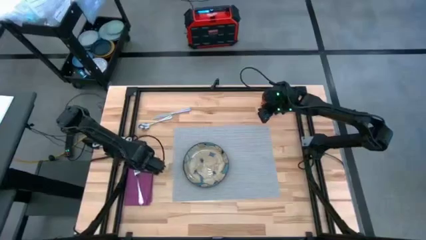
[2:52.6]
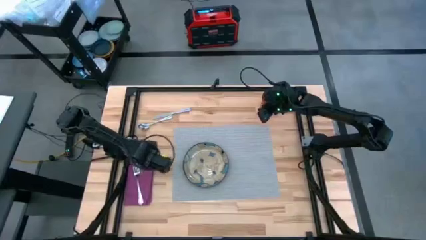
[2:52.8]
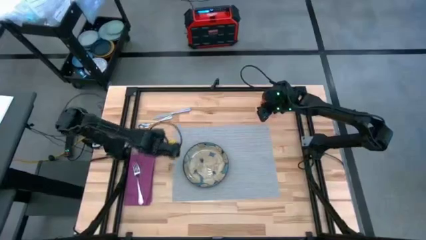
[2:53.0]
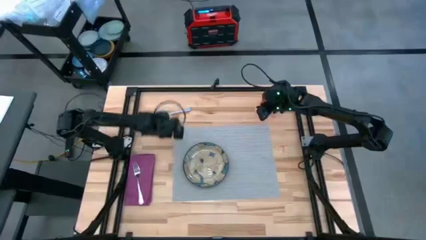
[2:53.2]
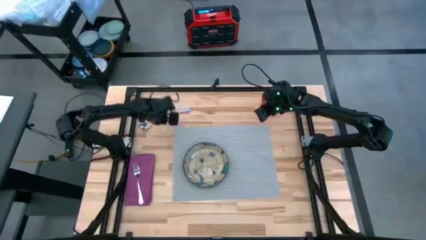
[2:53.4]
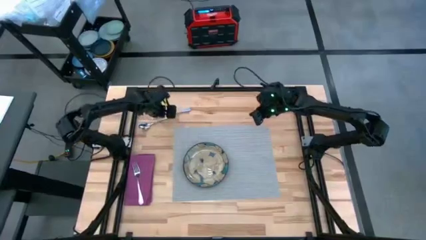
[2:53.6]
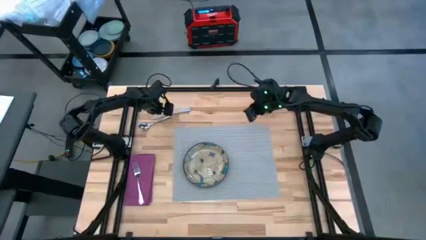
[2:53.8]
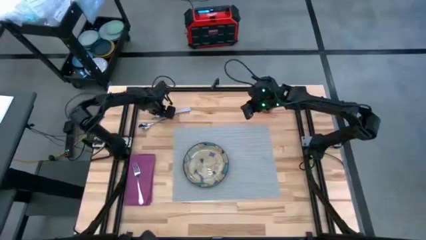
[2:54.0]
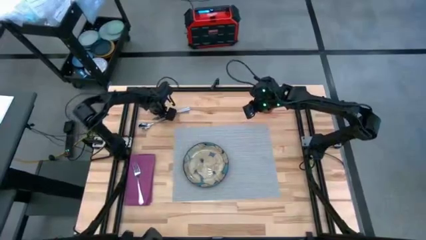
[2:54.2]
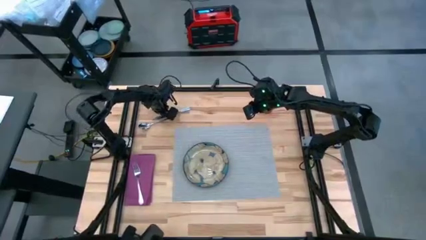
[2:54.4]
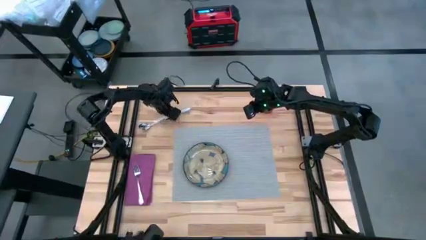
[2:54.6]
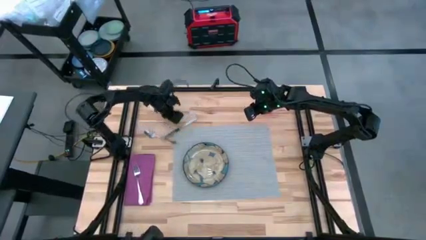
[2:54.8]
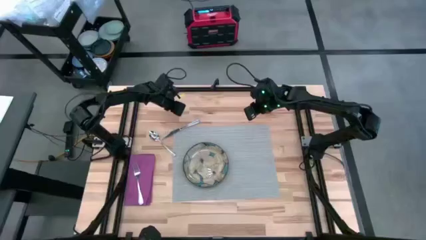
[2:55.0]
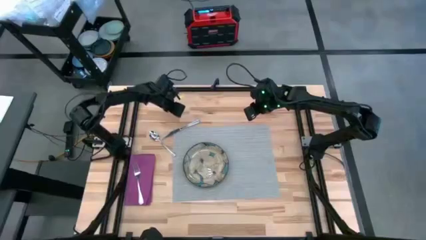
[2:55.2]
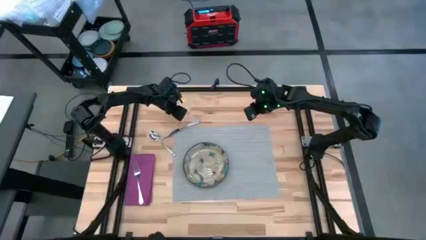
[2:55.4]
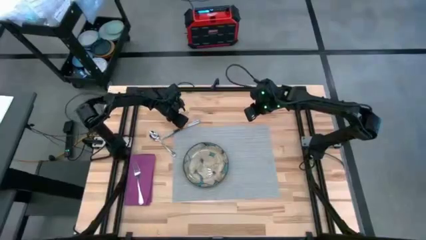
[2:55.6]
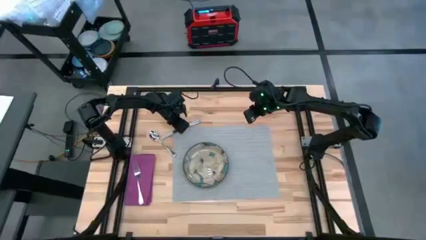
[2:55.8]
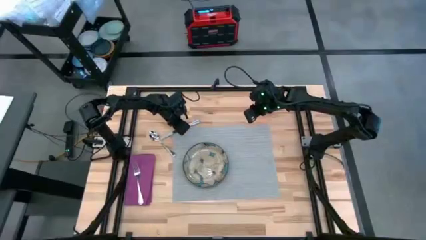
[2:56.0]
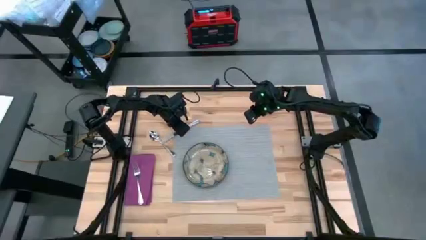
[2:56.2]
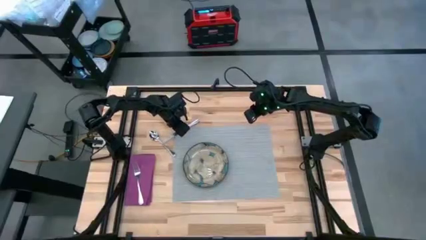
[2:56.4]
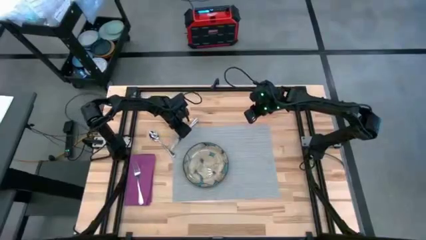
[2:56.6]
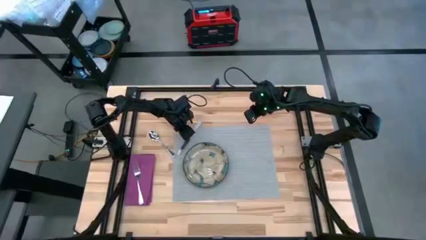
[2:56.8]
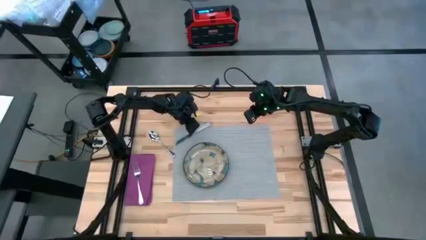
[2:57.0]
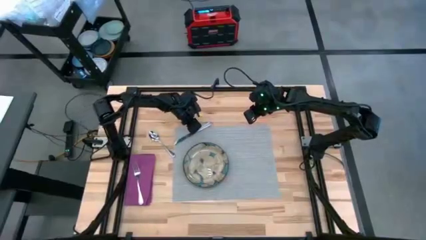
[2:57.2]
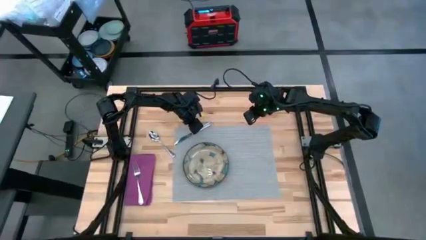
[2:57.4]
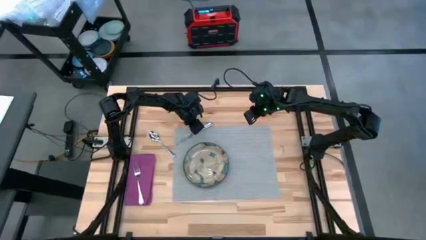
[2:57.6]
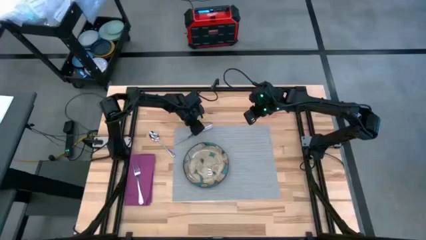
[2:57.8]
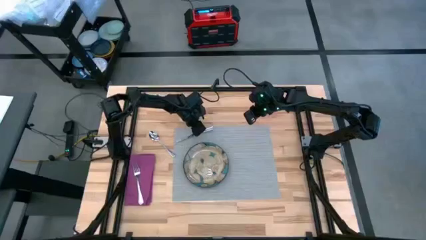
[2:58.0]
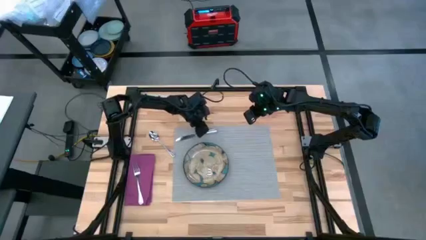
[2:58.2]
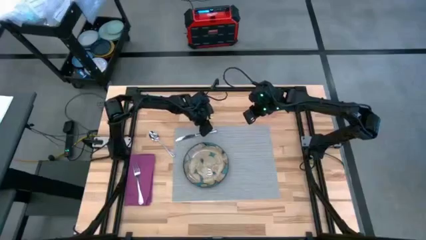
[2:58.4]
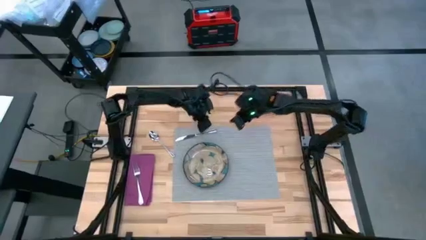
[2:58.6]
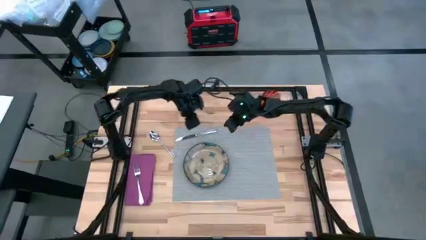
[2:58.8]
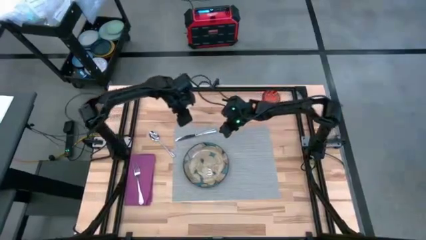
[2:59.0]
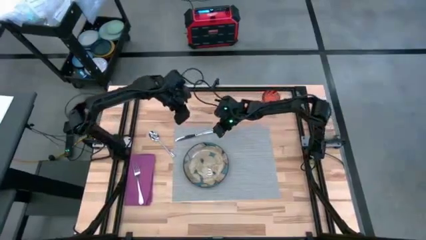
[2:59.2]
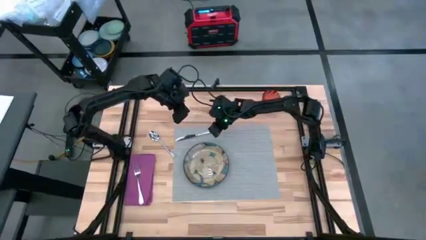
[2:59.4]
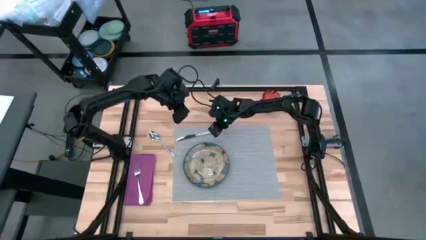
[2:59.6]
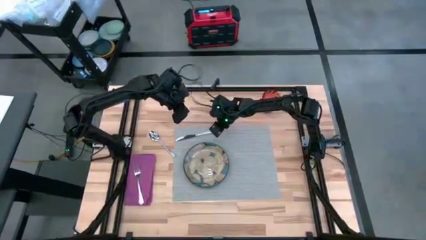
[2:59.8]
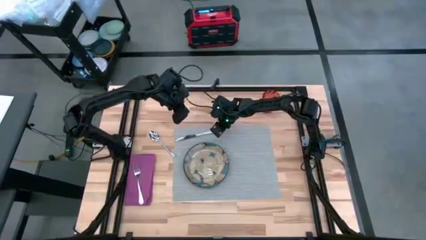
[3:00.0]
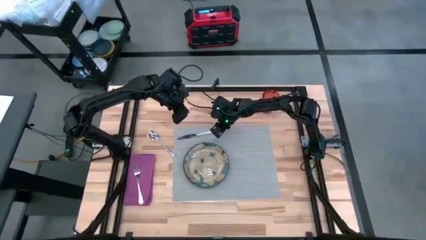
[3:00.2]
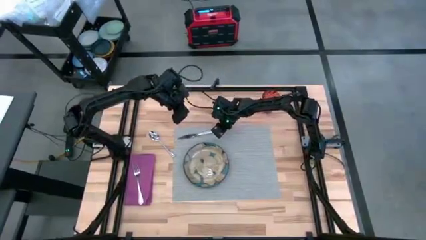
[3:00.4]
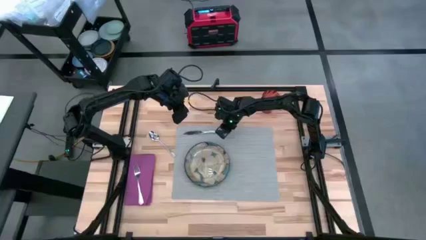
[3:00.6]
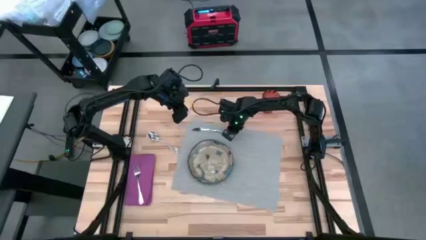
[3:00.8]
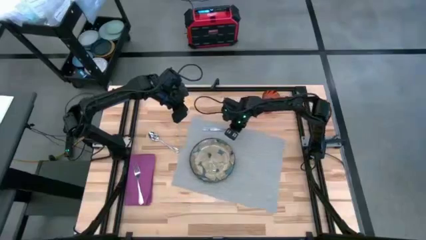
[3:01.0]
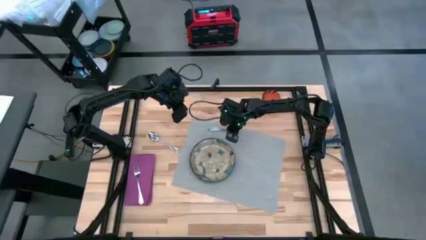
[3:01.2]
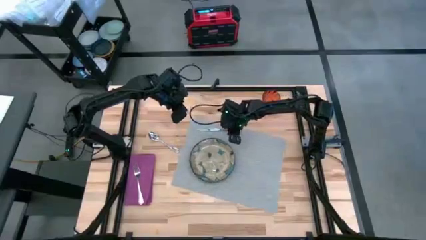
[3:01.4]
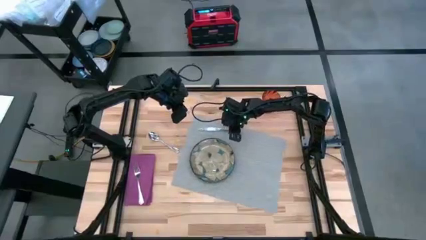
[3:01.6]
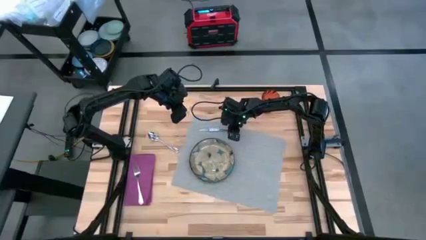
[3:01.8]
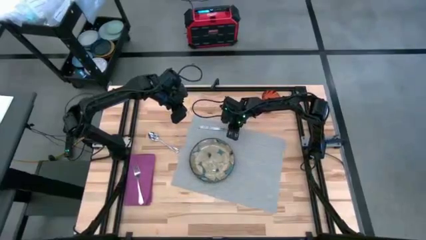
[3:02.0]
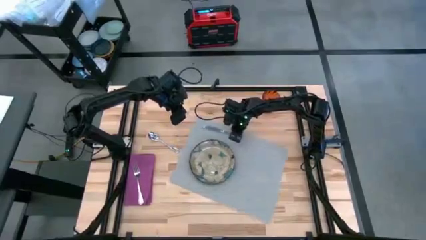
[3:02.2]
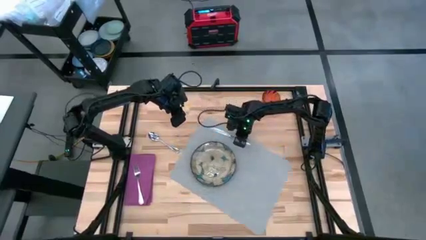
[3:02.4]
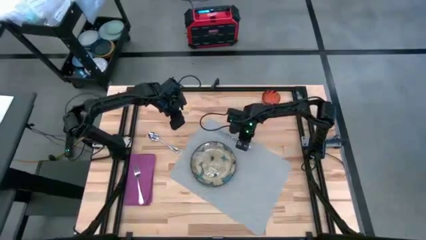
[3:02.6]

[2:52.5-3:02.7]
Task: Set table place
Move the silver knife beside the white floral patterned plate on the gray placemat
